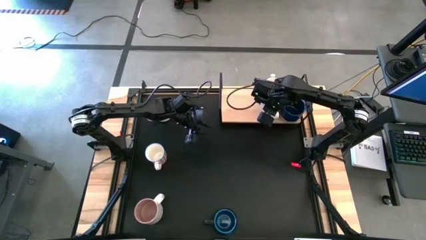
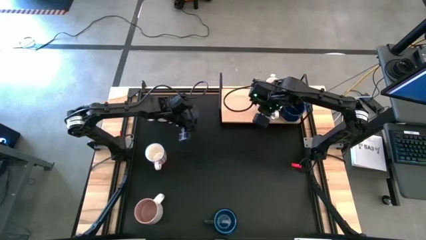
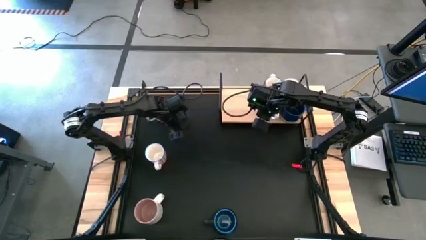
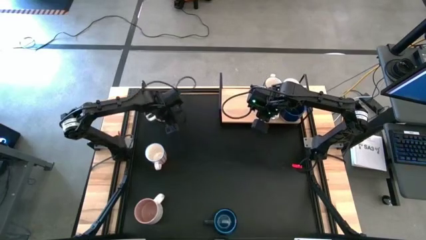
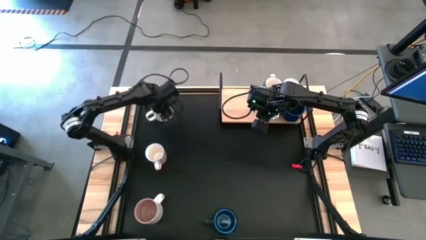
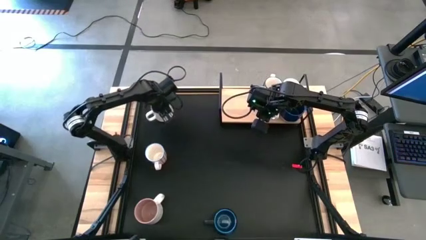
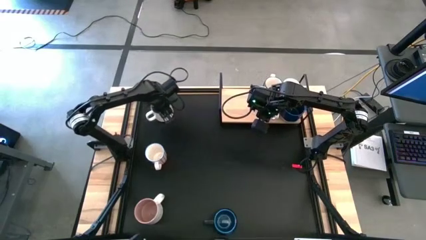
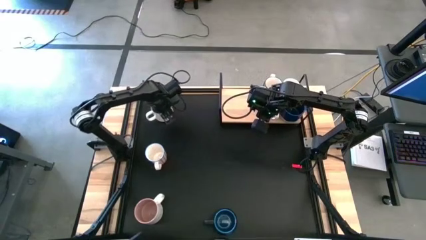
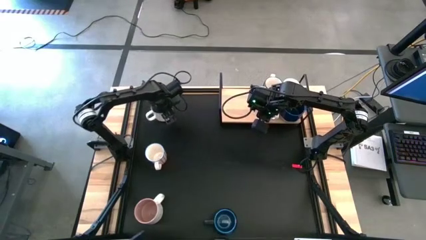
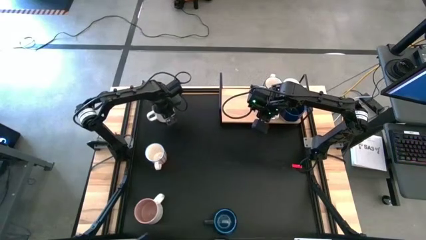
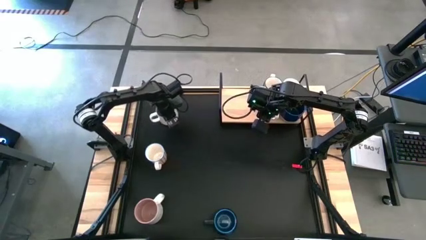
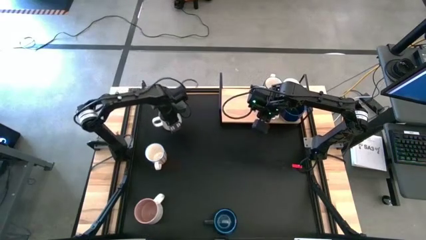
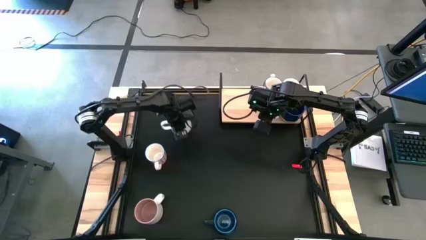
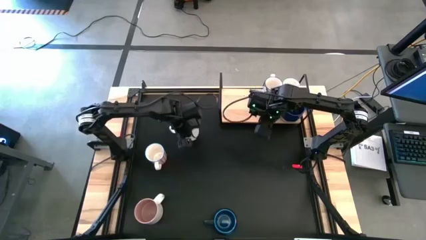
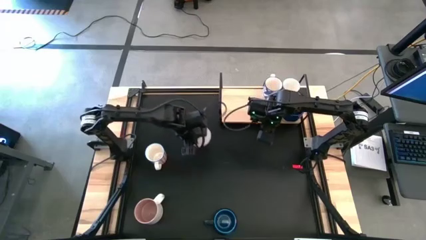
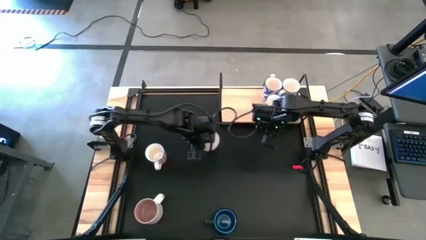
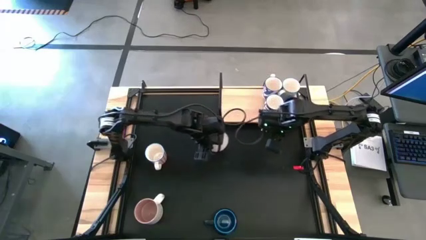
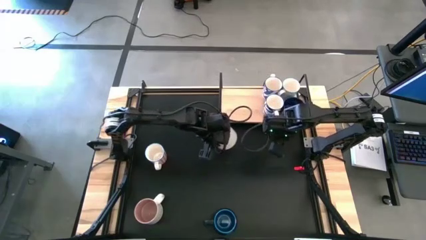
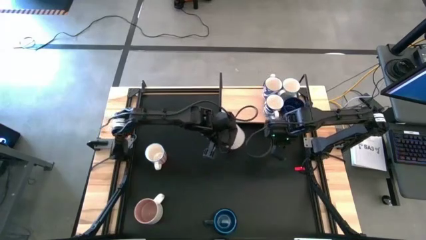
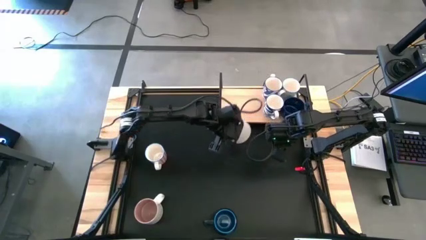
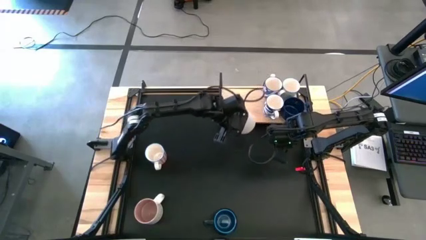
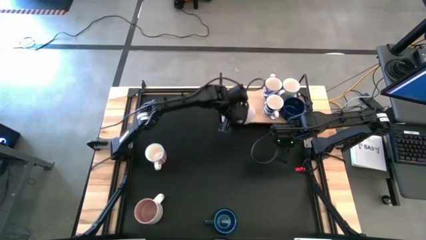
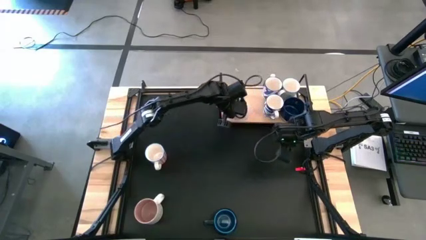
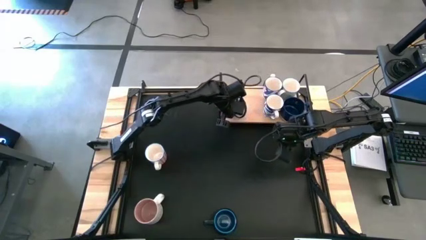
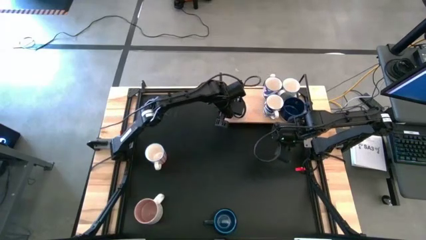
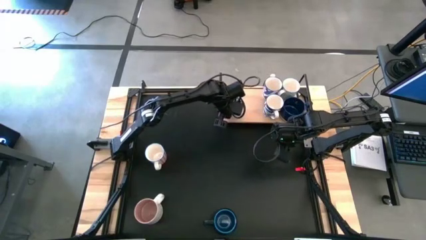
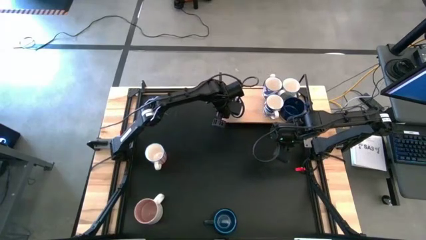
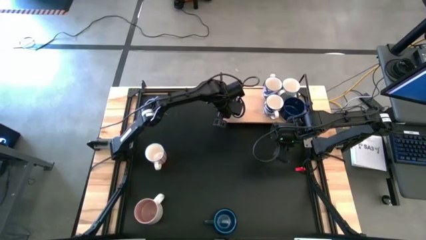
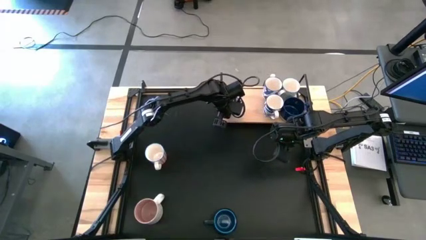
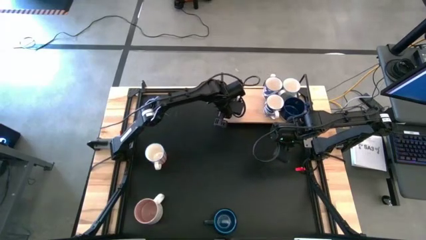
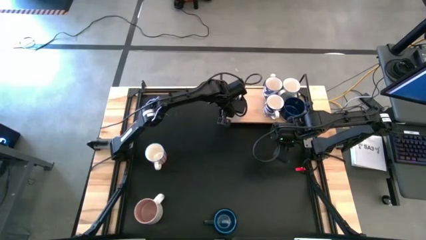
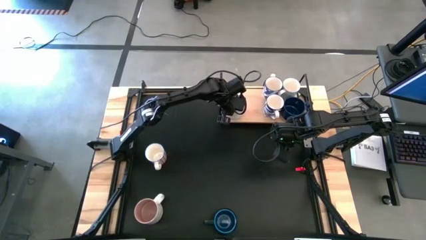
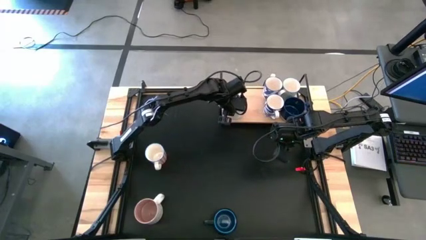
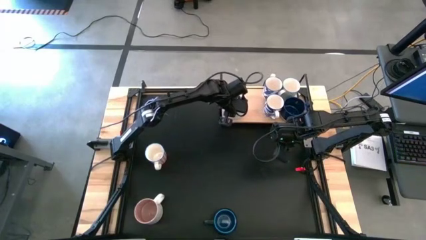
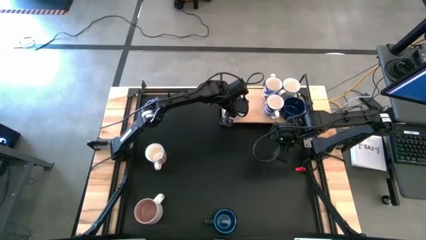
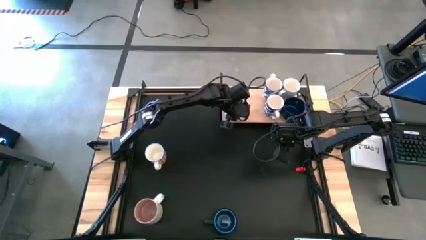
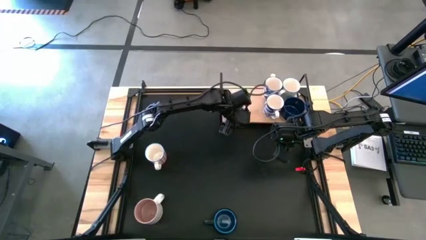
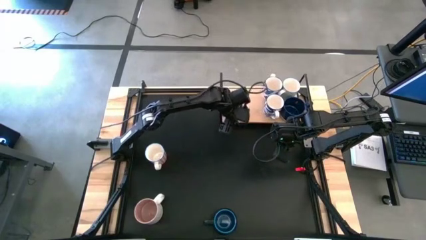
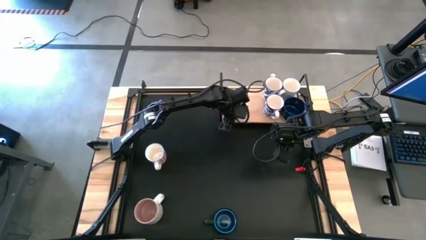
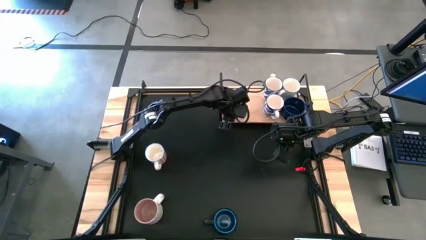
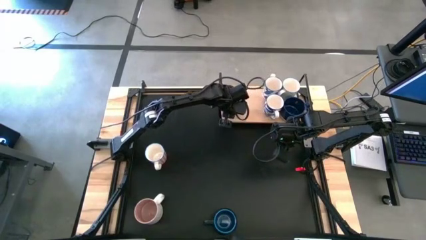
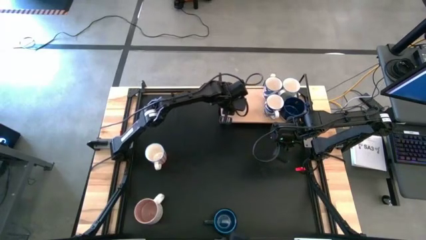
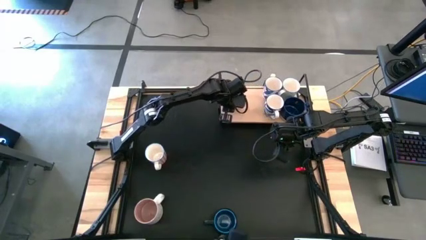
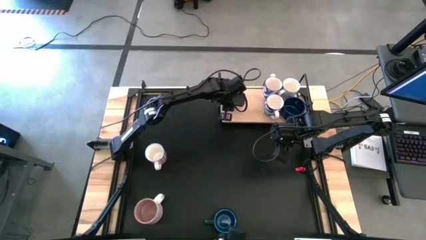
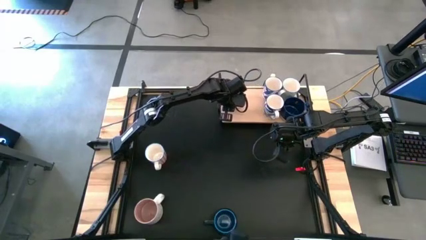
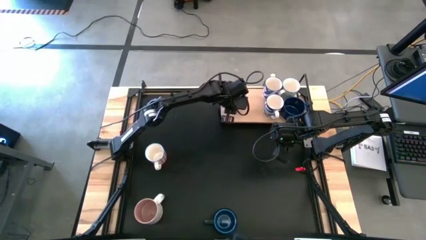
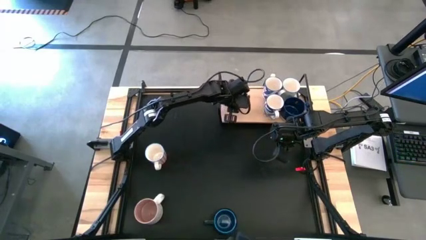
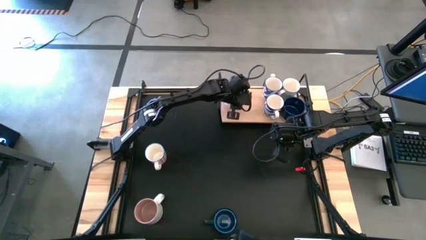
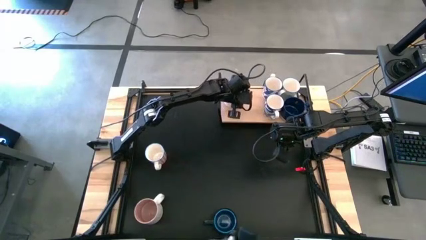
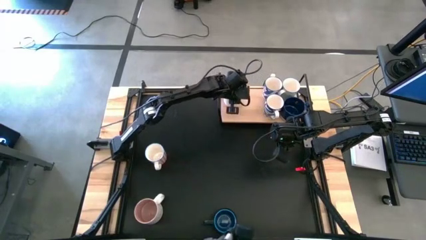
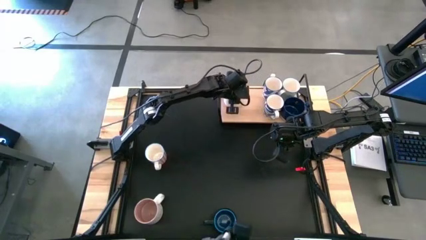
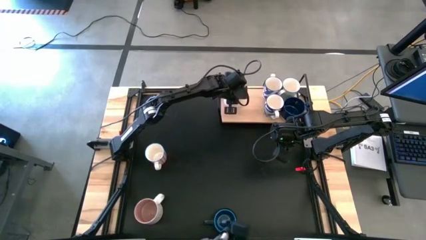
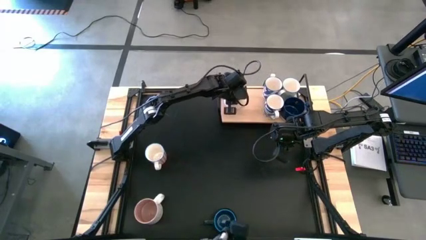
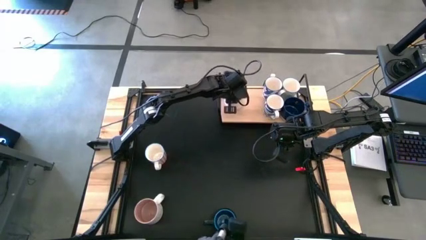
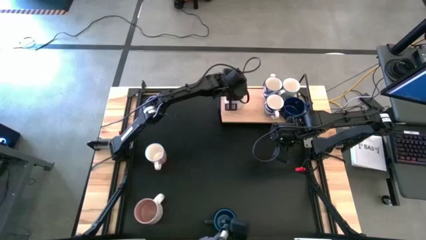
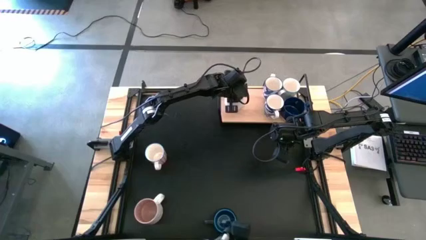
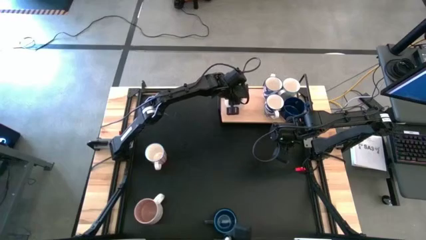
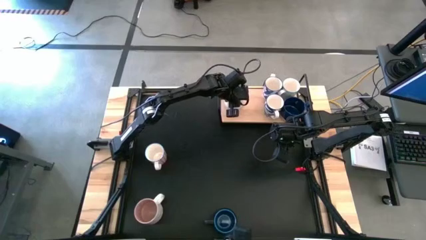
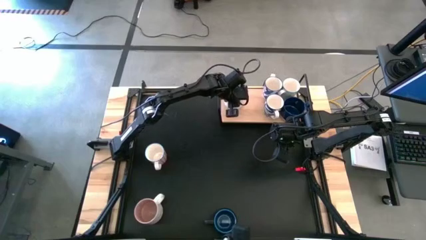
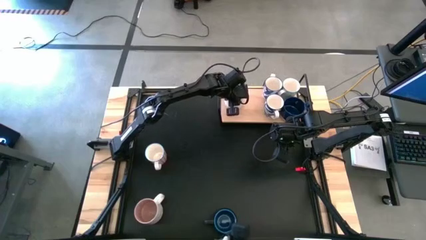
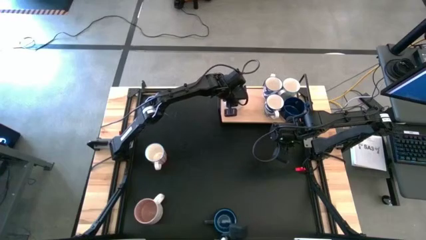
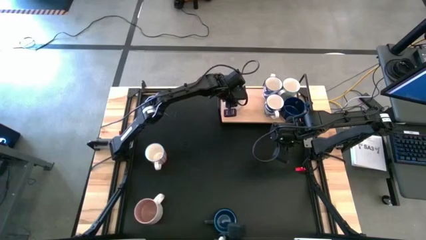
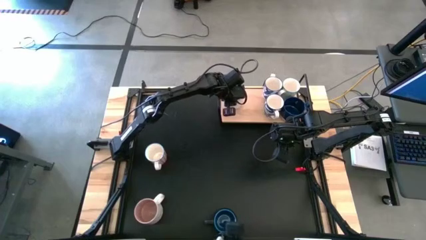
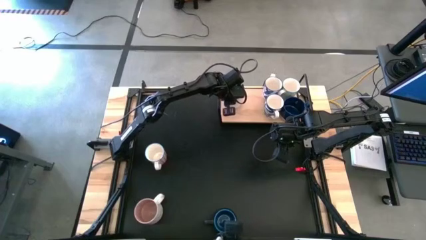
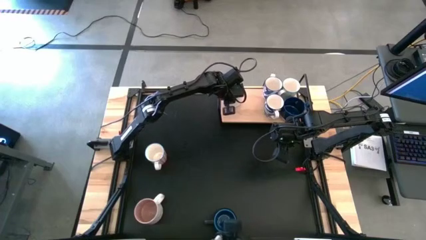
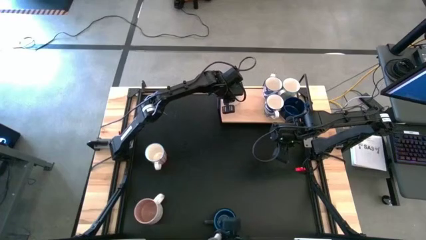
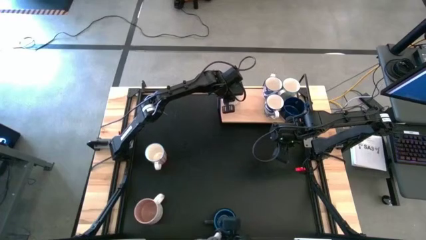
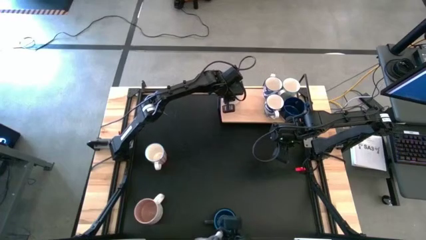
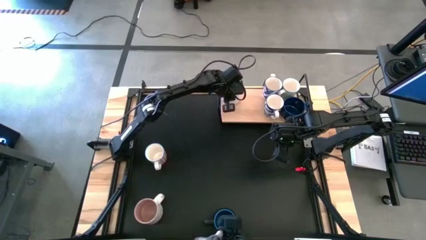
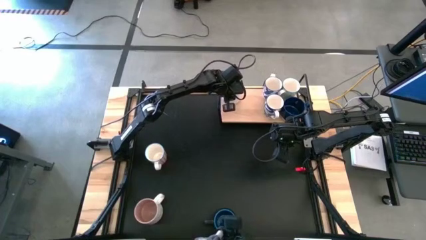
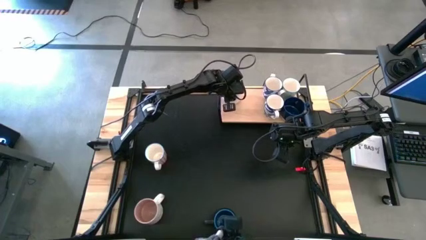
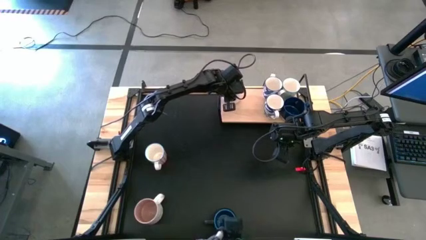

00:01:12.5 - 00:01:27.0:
Task: Place coffee mugs
Put the green mug on the shelf

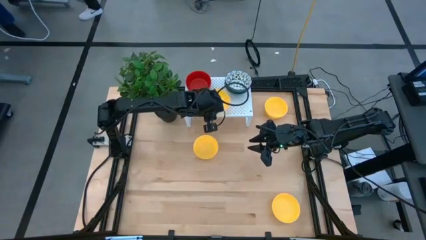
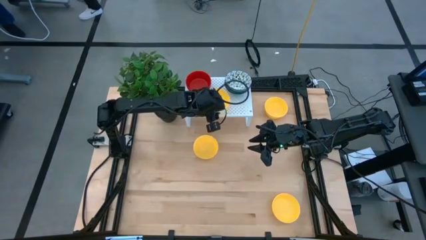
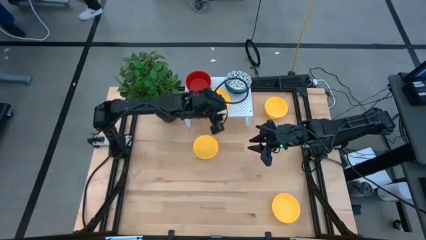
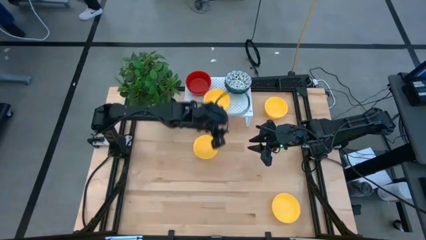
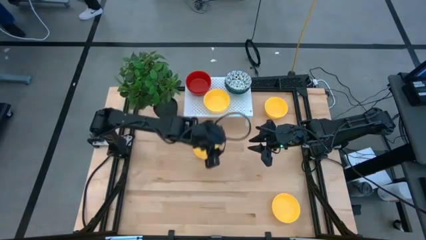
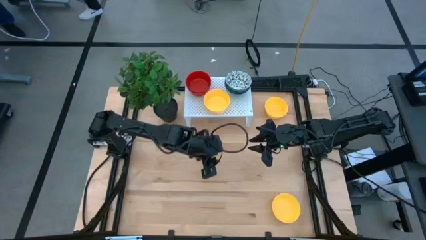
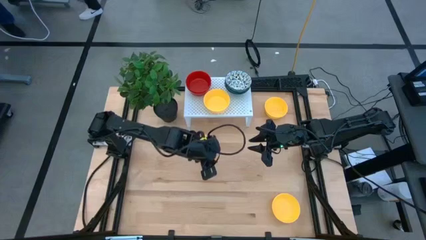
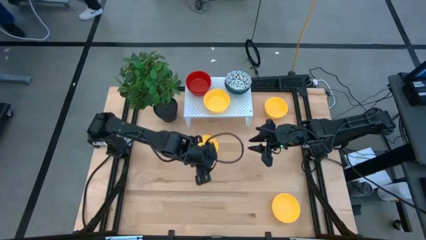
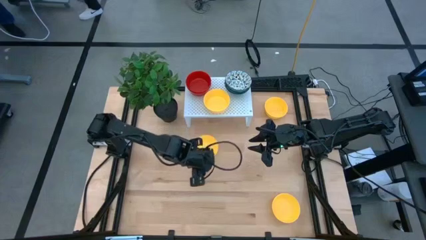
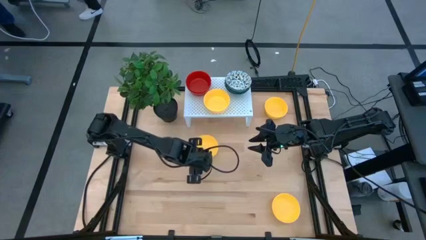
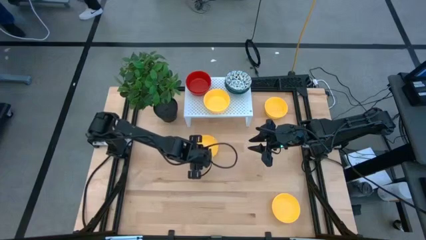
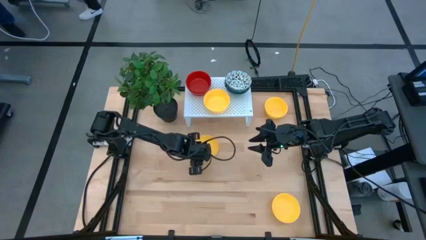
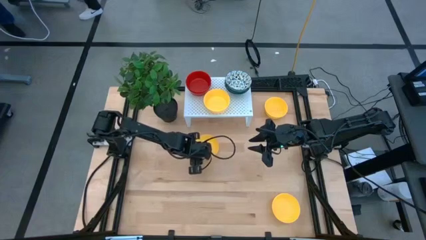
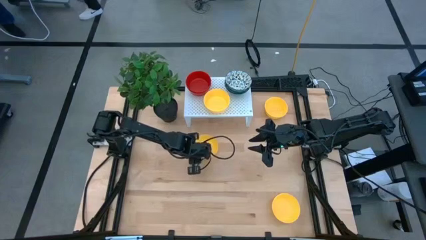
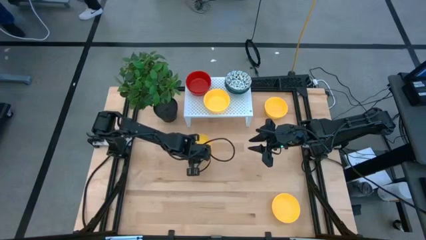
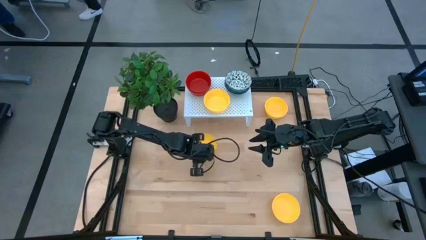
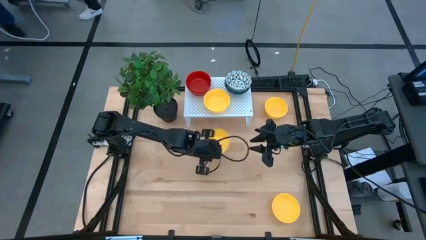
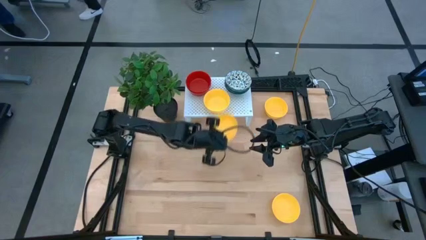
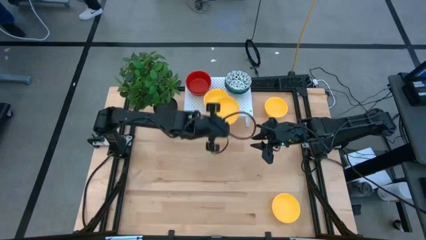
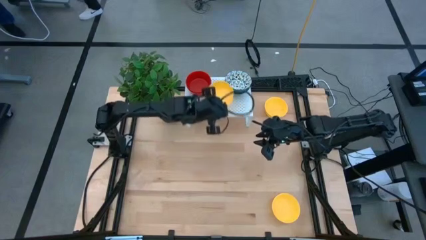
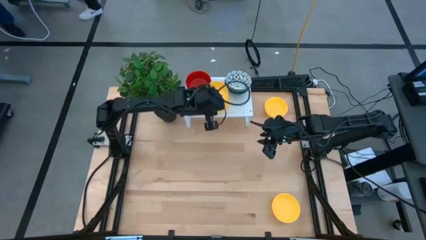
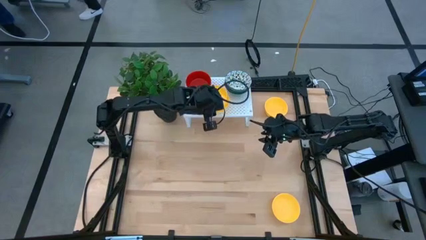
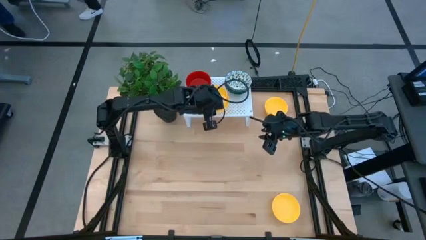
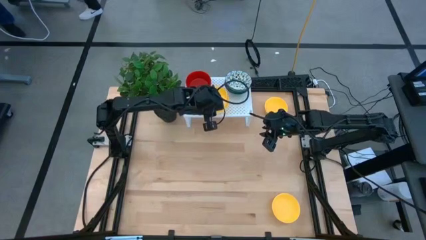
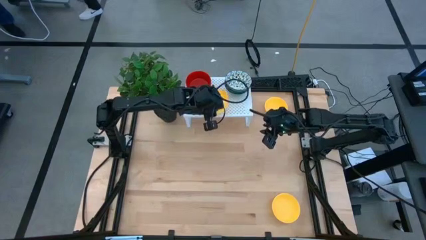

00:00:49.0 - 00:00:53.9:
Task: Pick & Place Mini bowls
Stack the yellow bowl on the yellow bowl on the shelf
